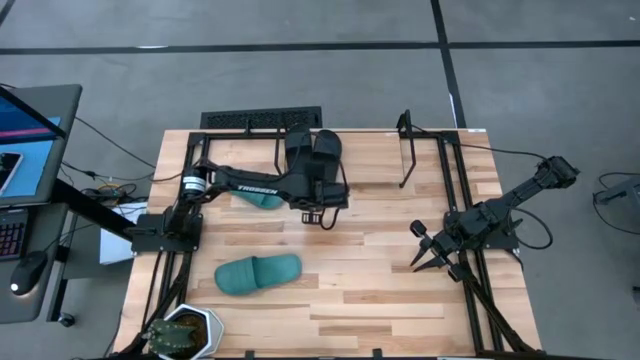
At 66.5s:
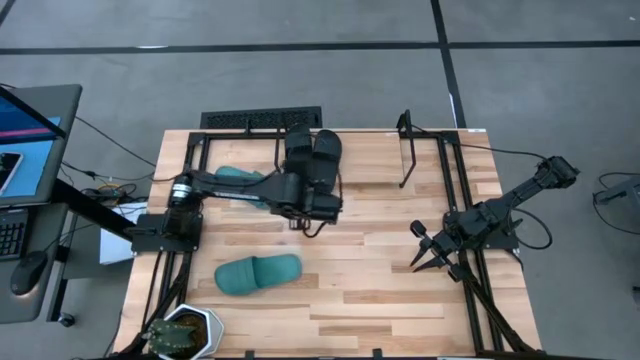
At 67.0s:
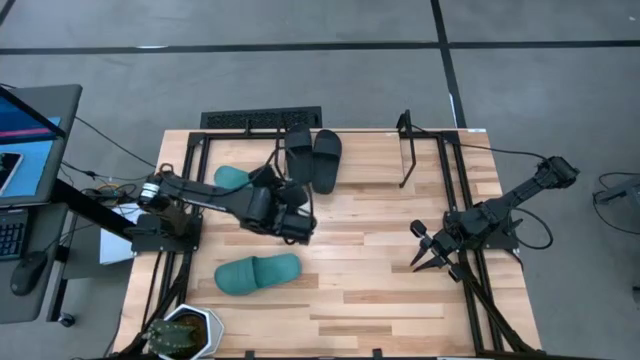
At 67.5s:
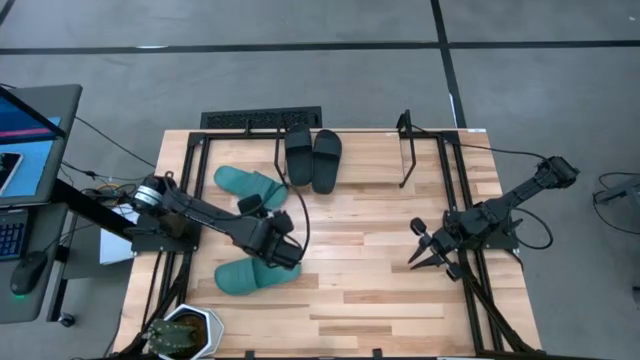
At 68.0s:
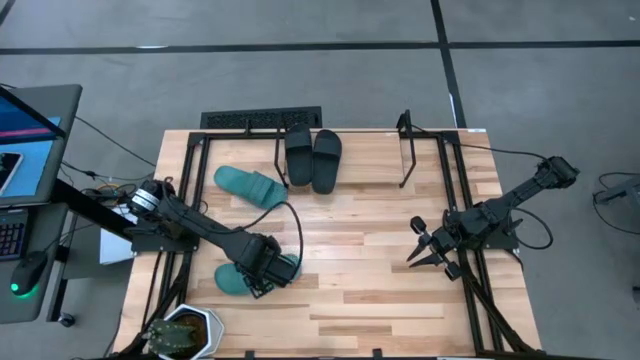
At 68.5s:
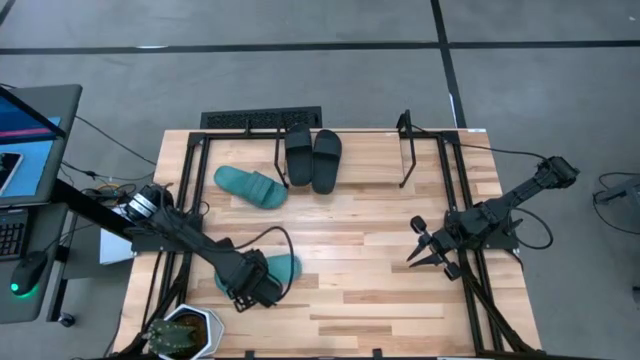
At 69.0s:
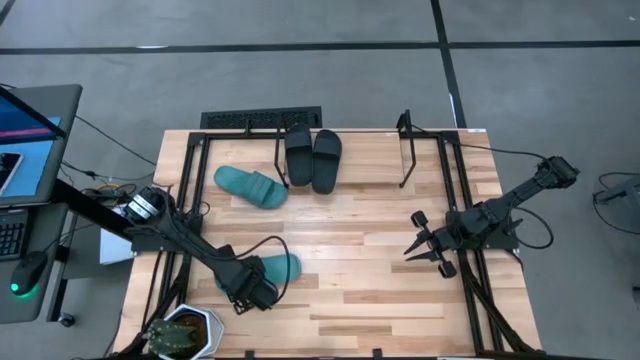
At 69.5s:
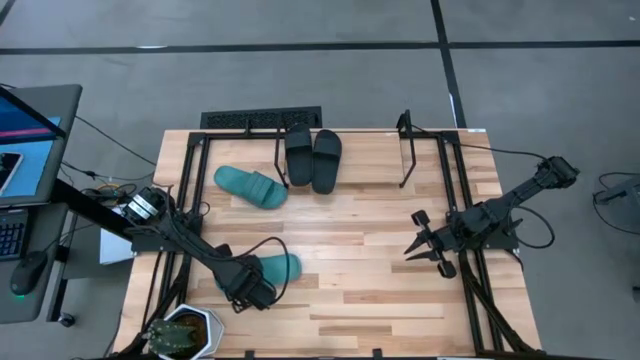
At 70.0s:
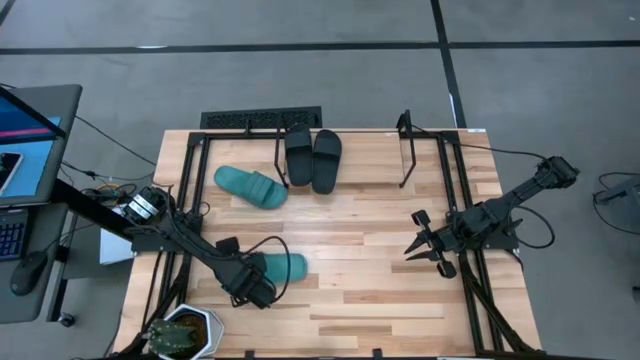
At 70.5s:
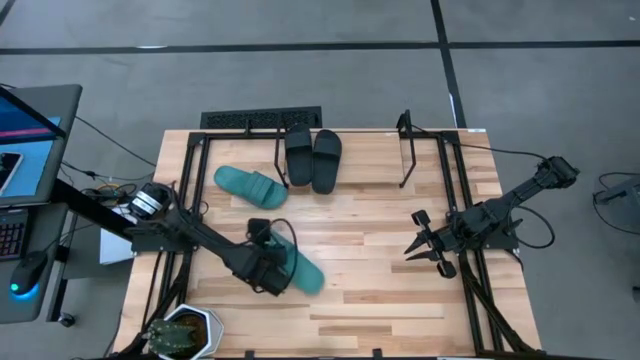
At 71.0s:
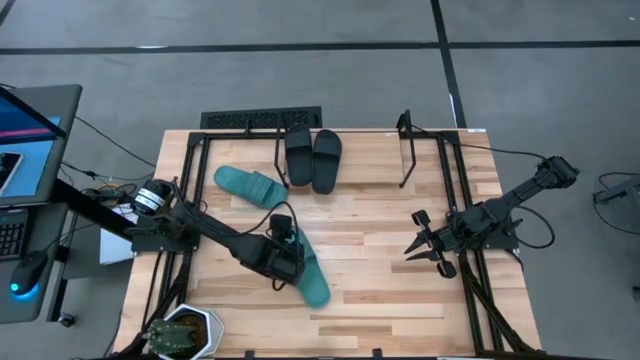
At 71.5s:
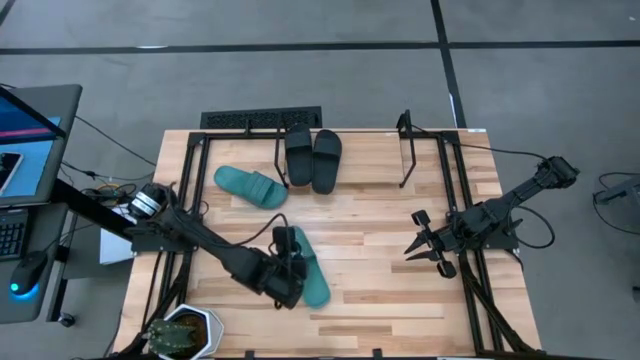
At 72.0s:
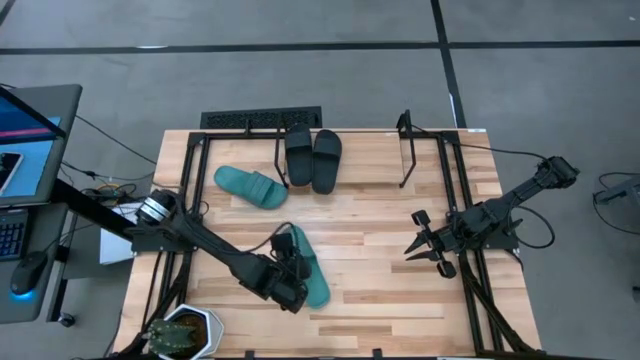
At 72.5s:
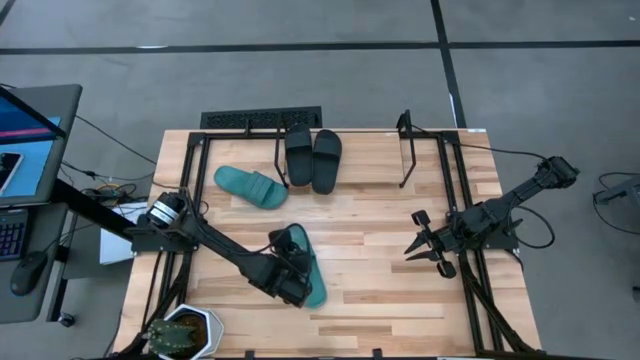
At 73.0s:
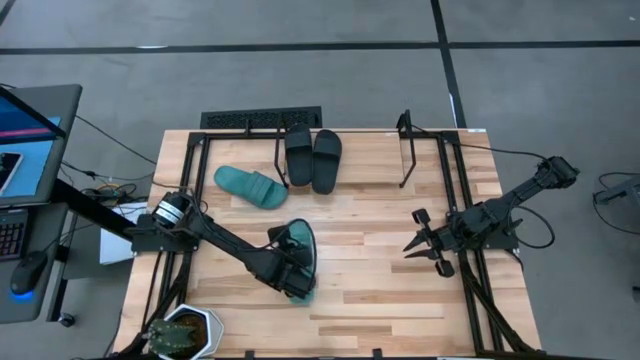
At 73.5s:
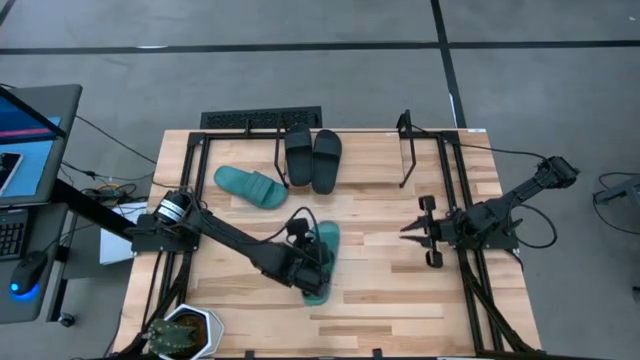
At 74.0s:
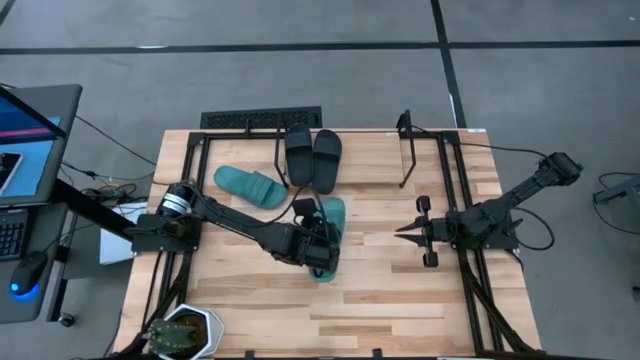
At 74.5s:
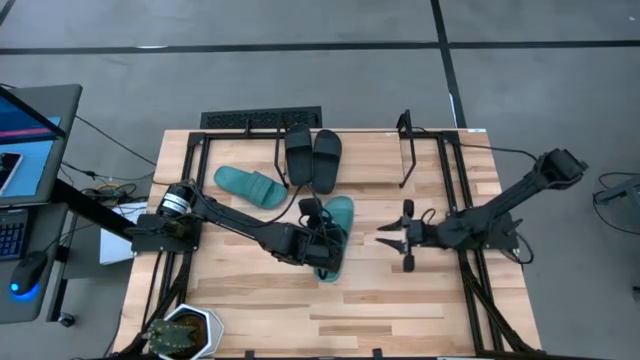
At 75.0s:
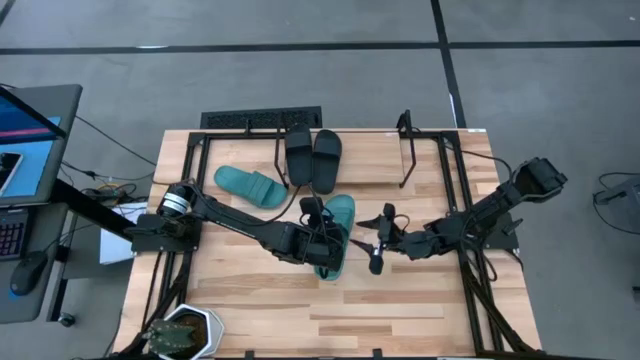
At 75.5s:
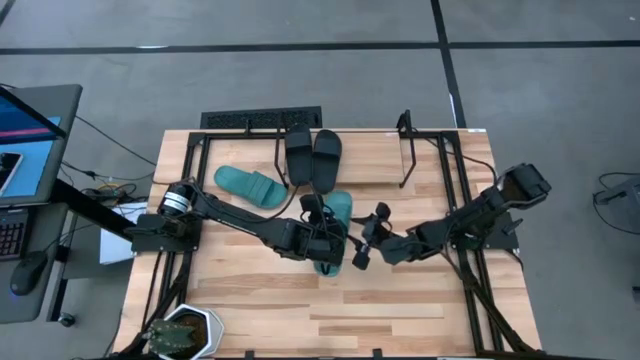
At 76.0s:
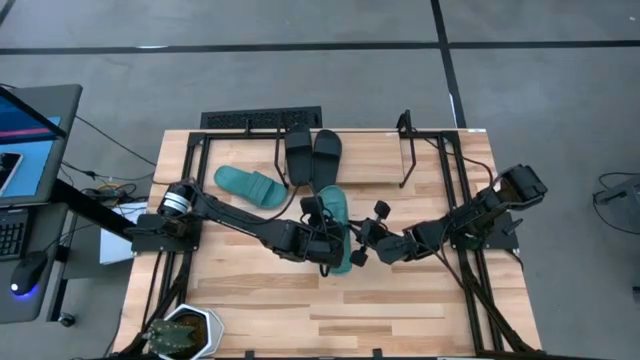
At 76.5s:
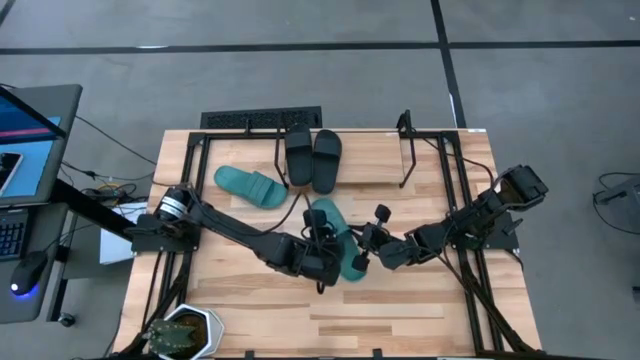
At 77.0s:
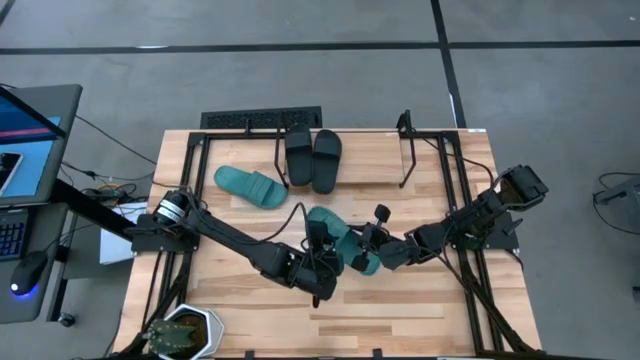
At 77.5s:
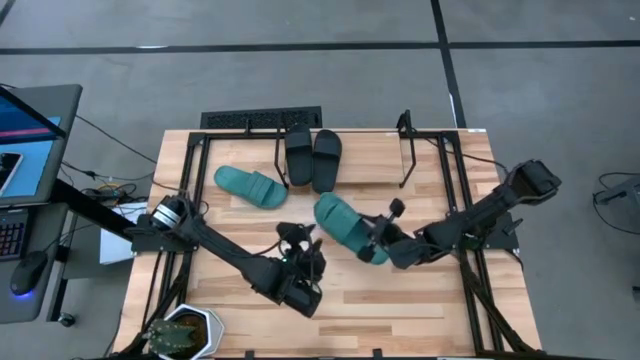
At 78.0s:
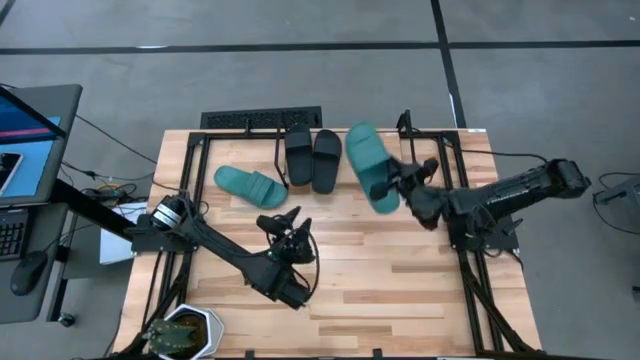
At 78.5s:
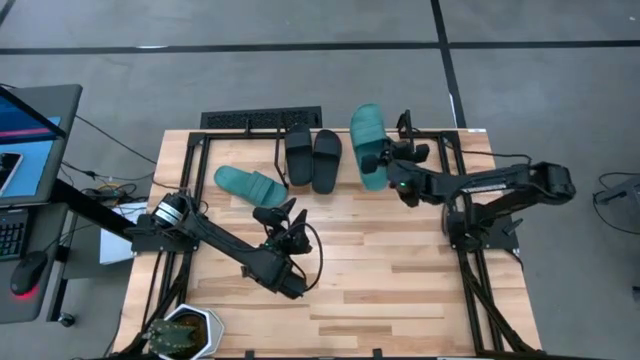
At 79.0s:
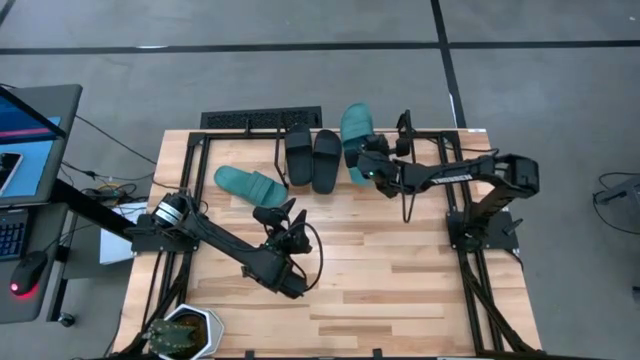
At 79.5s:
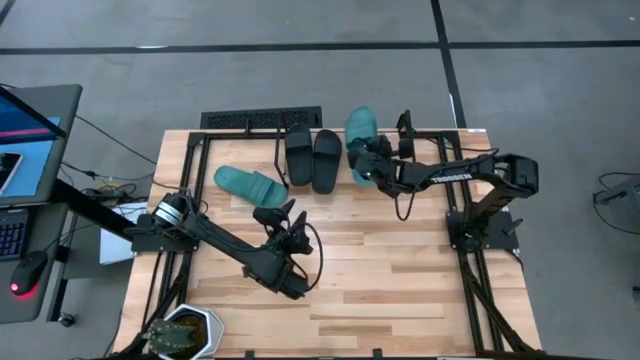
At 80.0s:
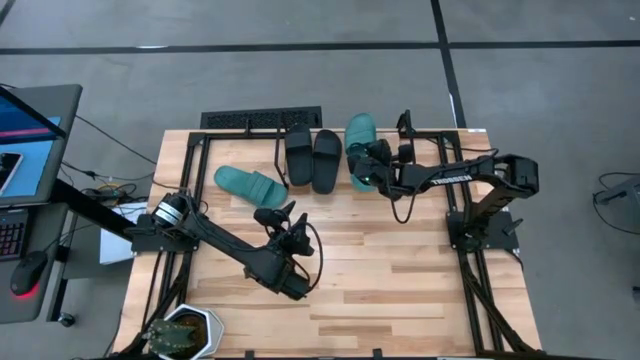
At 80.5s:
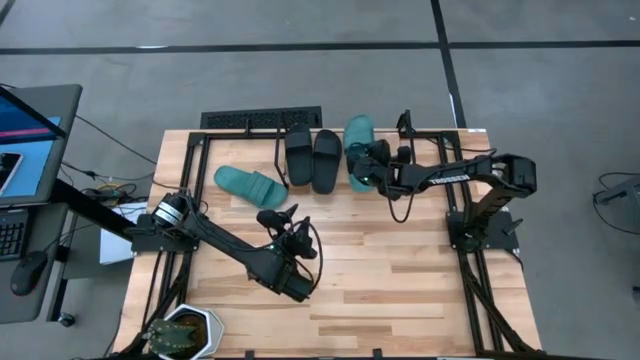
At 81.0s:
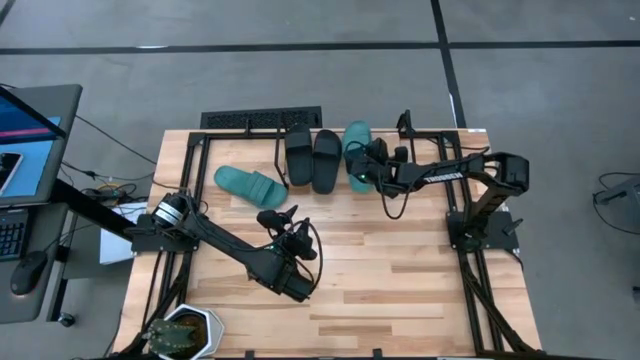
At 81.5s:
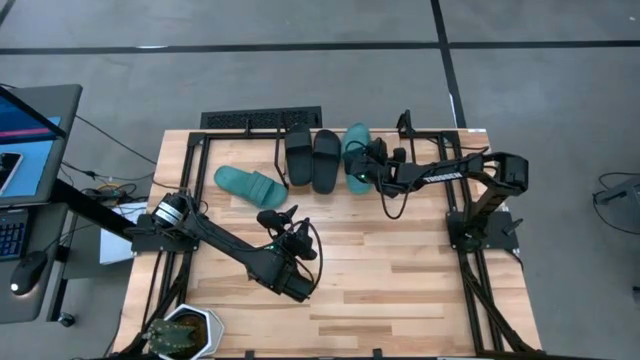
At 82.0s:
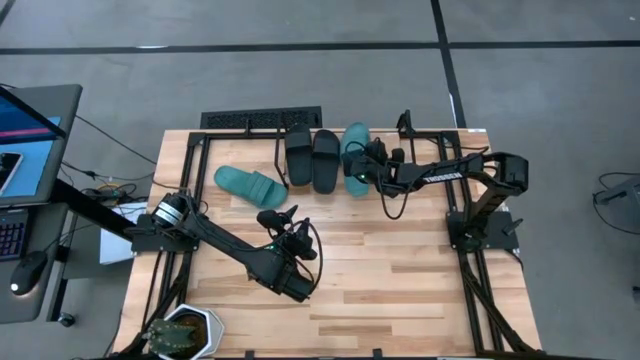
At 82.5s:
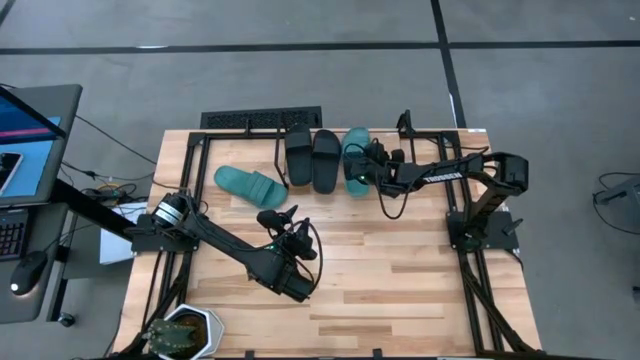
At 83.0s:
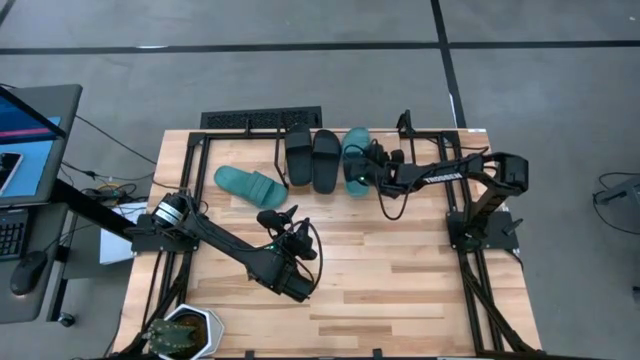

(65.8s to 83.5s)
Task: Pick and place slides into the shelf
Put the bottom dark green slipper on the shelf

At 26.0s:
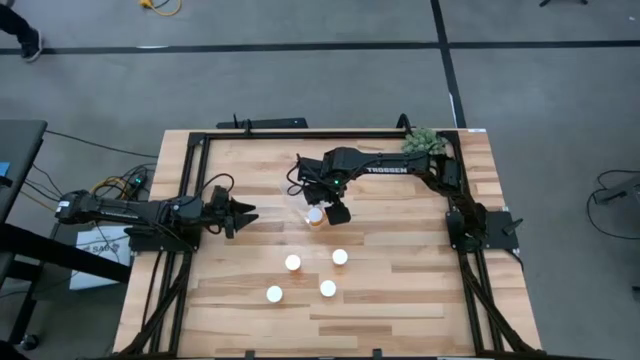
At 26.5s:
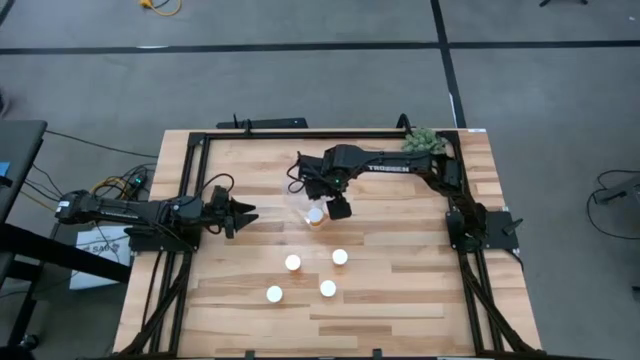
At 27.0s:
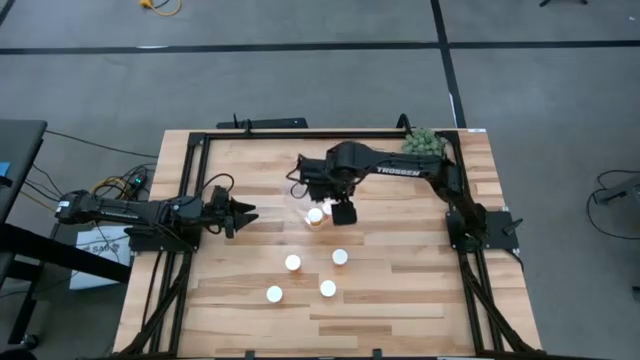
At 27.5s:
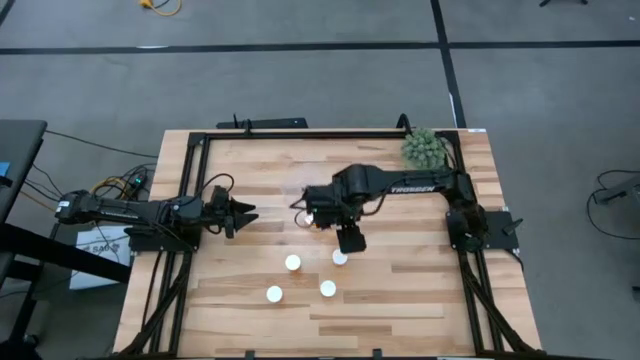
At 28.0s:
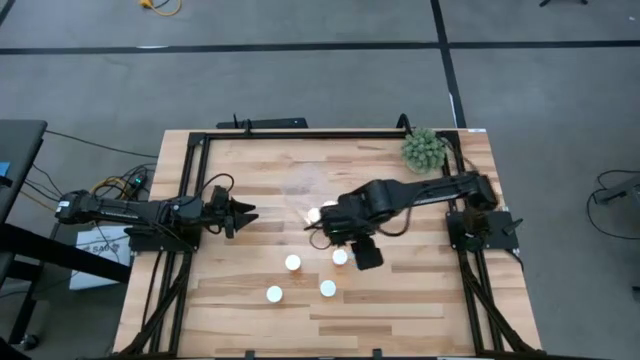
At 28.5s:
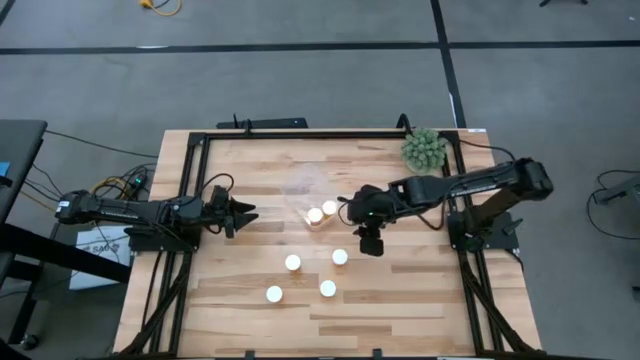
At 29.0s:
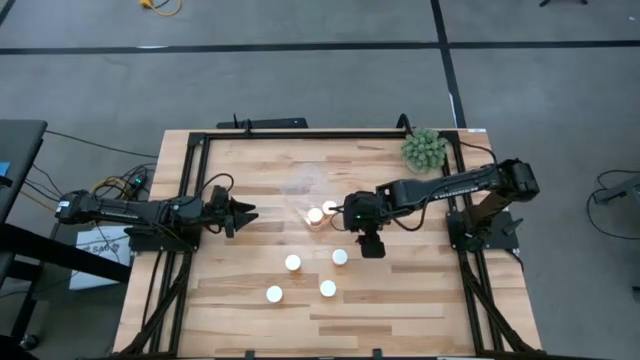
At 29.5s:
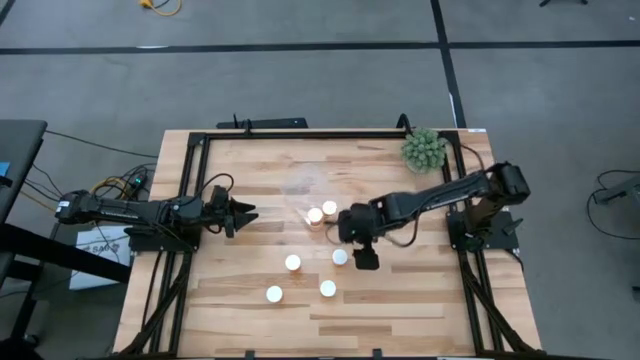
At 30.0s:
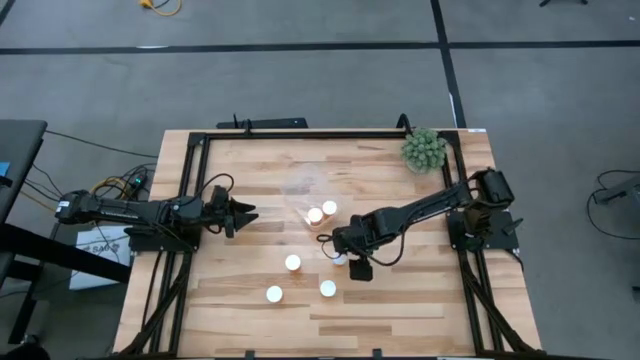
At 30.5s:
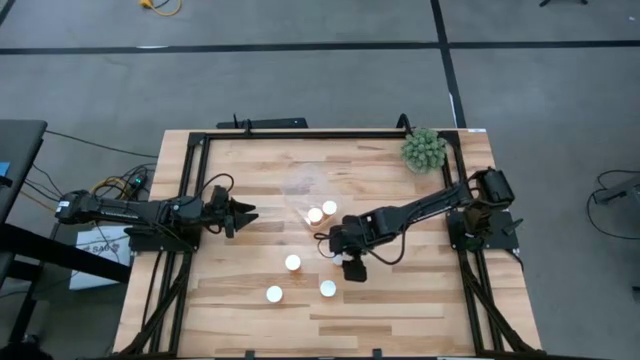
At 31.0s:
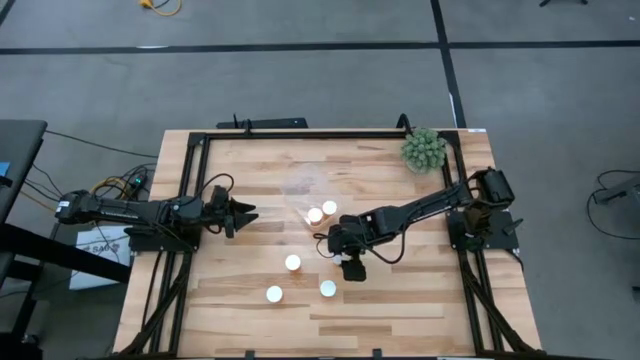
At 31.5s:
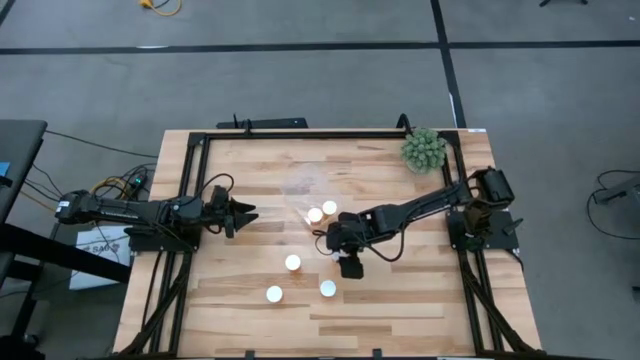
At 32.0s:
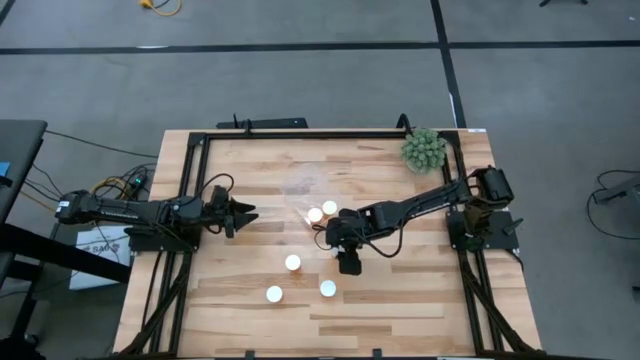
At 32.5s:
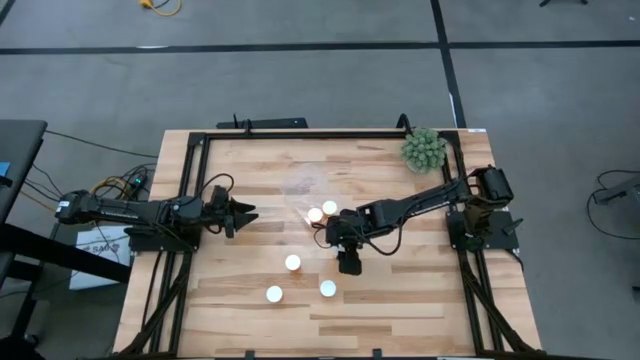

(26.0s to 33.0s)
Task: Pick and place pill bottles into a basket
Put the orange medicine bottle into the transparent bin
